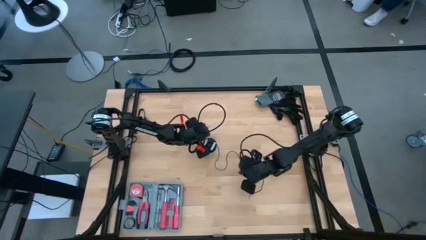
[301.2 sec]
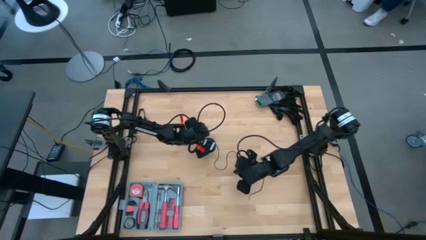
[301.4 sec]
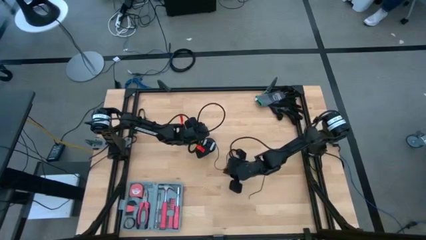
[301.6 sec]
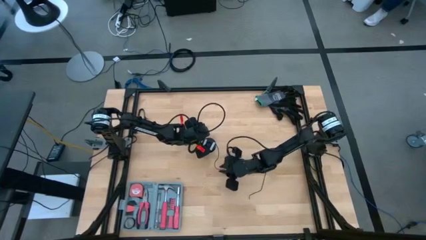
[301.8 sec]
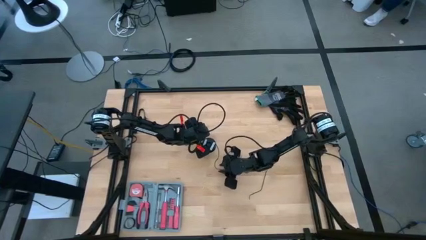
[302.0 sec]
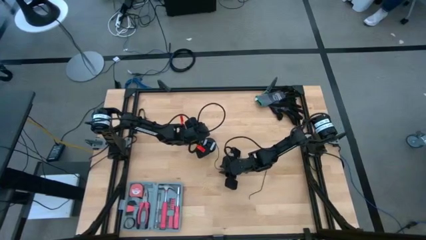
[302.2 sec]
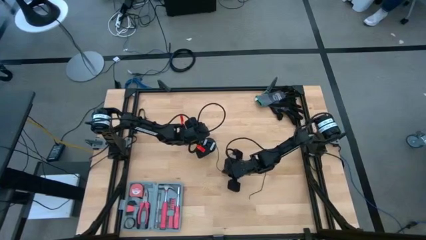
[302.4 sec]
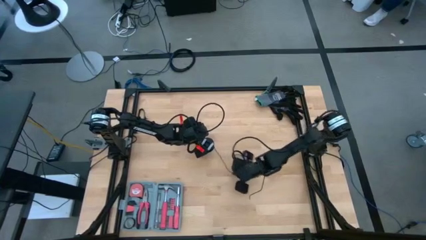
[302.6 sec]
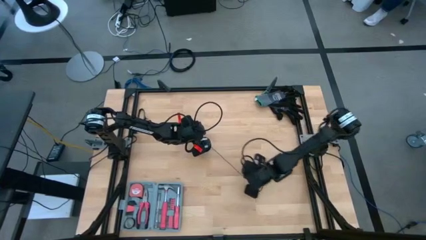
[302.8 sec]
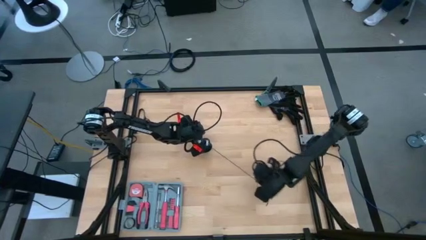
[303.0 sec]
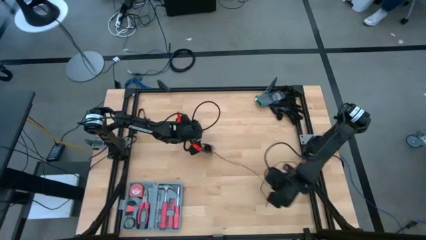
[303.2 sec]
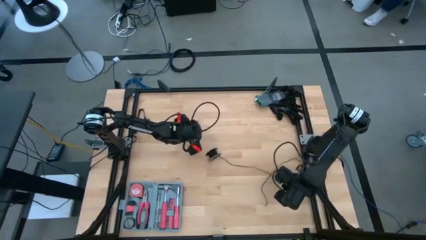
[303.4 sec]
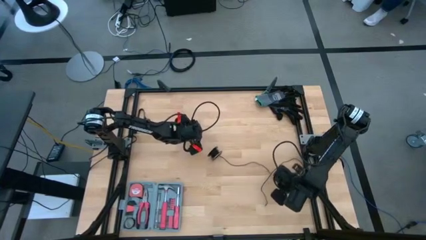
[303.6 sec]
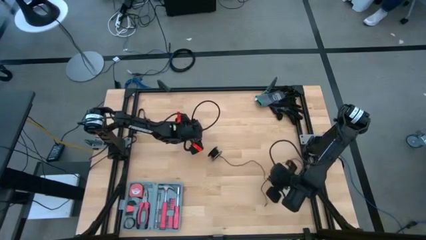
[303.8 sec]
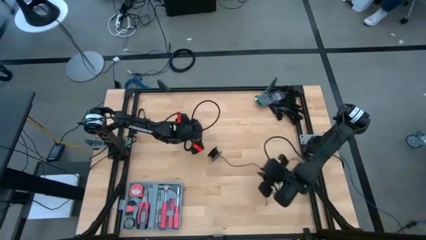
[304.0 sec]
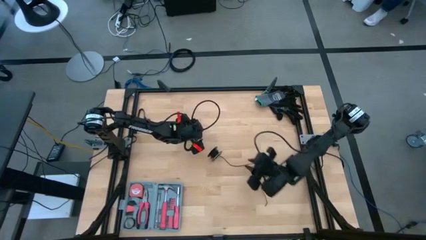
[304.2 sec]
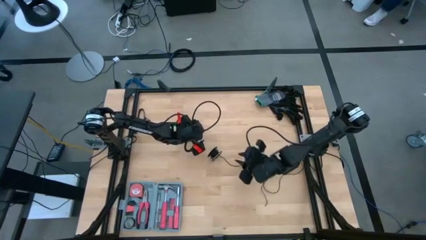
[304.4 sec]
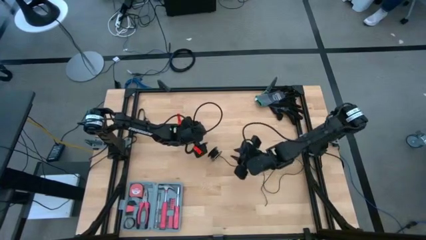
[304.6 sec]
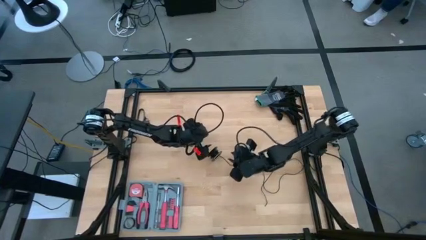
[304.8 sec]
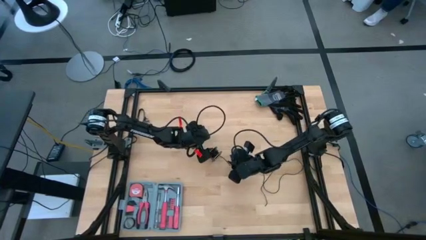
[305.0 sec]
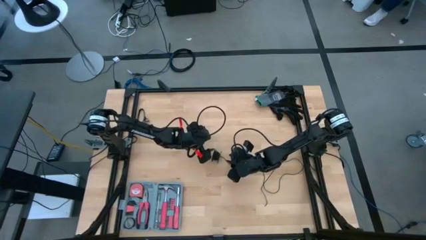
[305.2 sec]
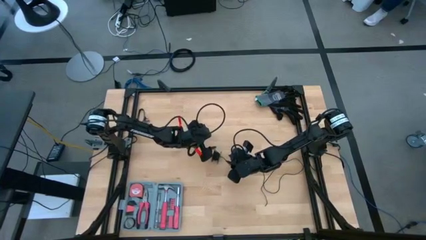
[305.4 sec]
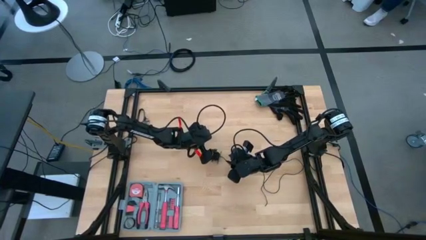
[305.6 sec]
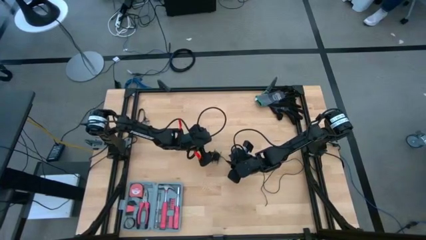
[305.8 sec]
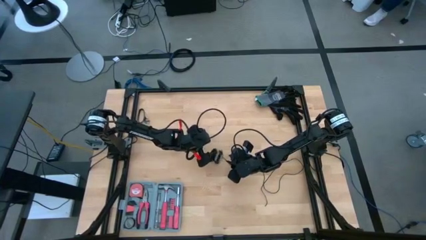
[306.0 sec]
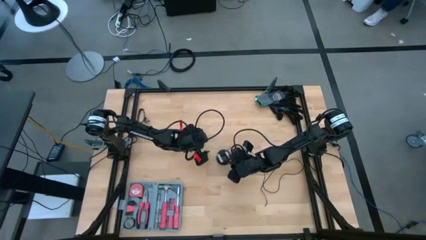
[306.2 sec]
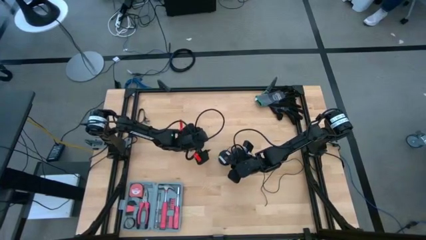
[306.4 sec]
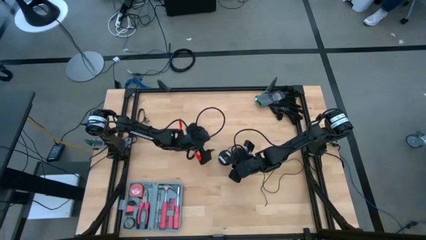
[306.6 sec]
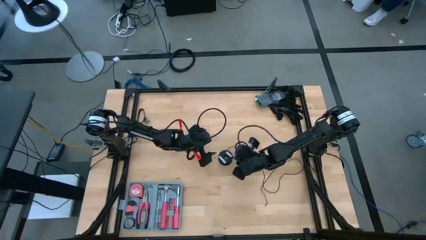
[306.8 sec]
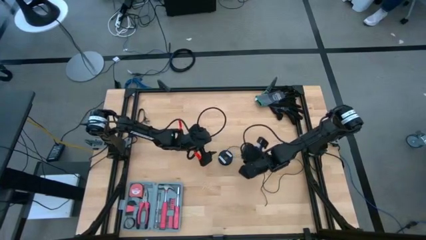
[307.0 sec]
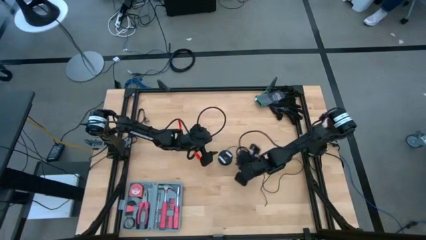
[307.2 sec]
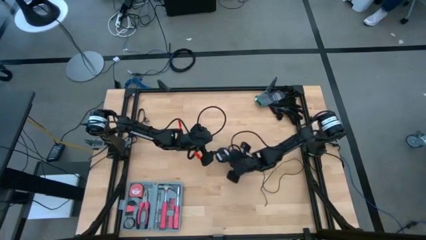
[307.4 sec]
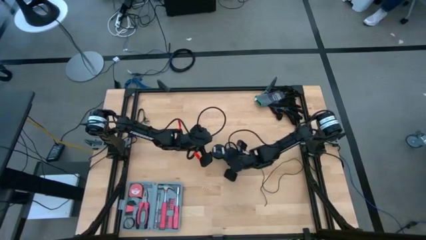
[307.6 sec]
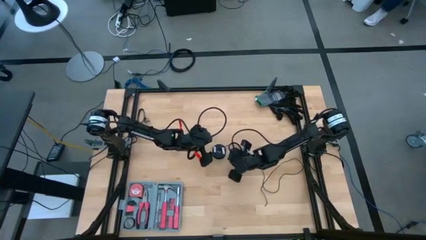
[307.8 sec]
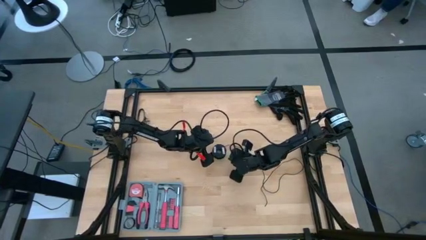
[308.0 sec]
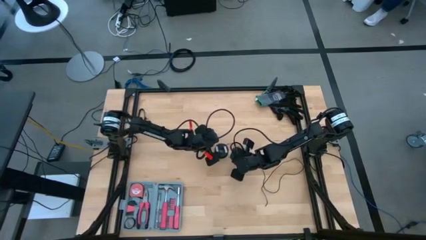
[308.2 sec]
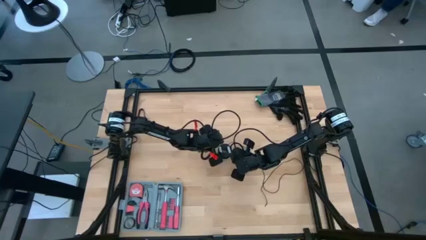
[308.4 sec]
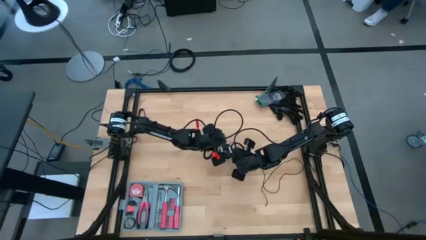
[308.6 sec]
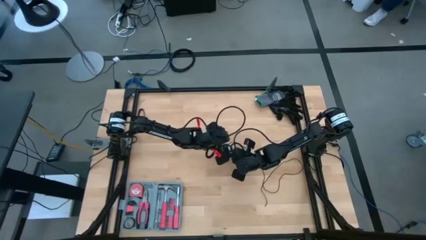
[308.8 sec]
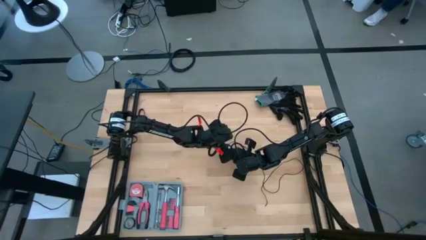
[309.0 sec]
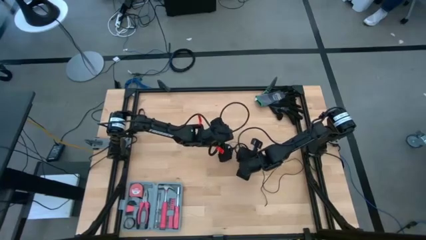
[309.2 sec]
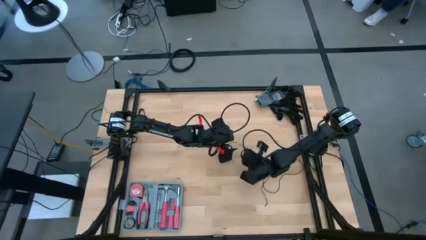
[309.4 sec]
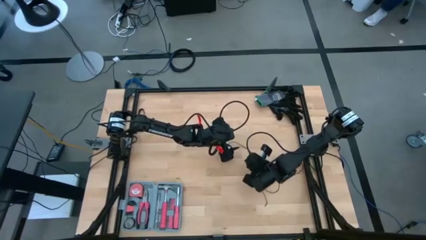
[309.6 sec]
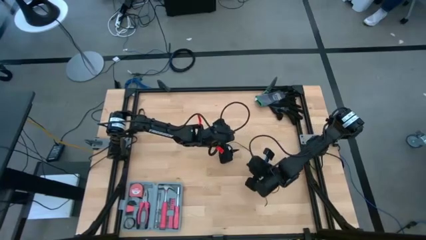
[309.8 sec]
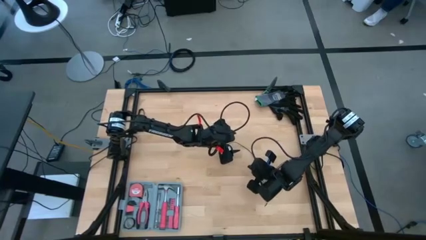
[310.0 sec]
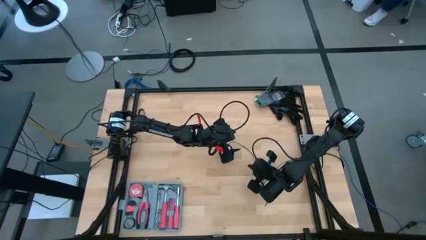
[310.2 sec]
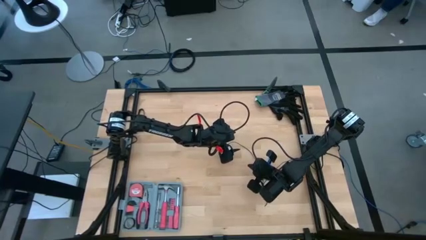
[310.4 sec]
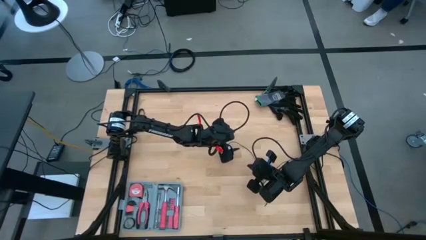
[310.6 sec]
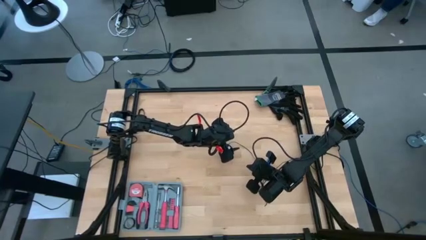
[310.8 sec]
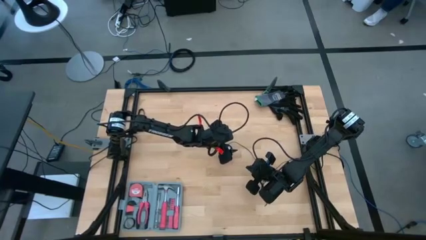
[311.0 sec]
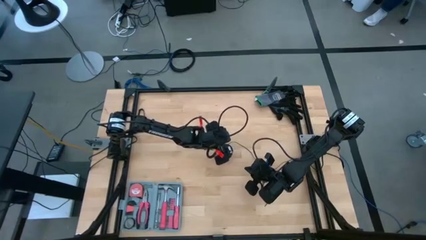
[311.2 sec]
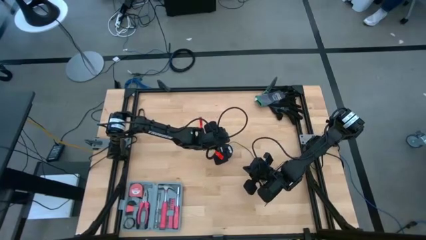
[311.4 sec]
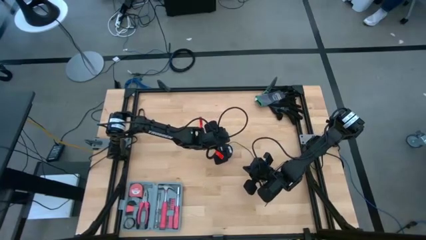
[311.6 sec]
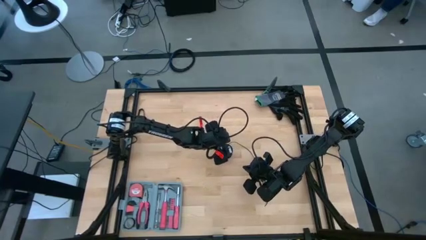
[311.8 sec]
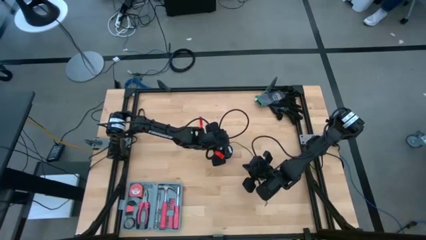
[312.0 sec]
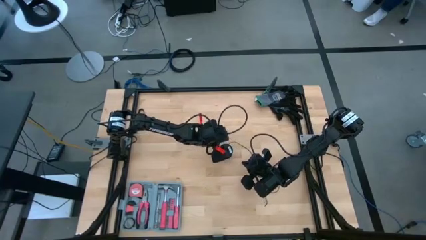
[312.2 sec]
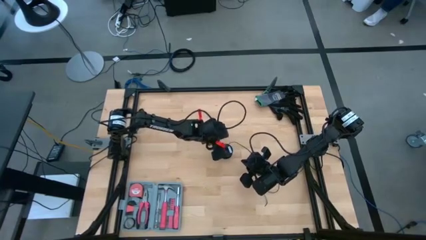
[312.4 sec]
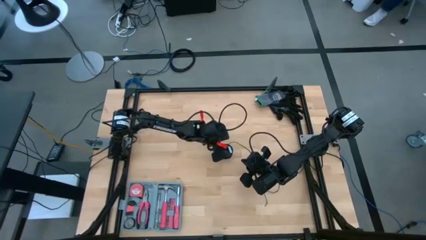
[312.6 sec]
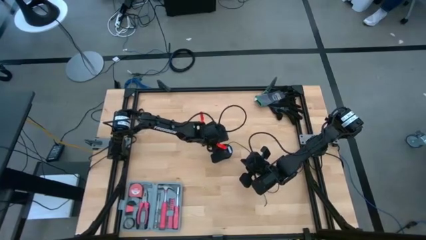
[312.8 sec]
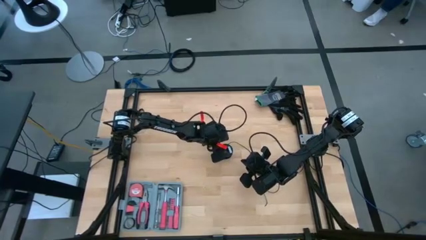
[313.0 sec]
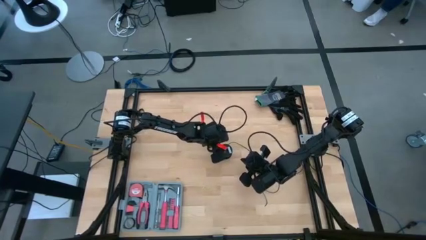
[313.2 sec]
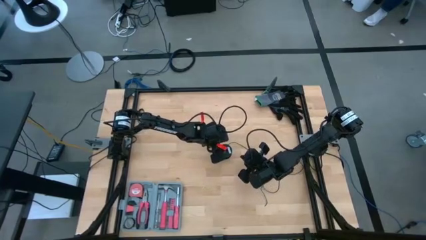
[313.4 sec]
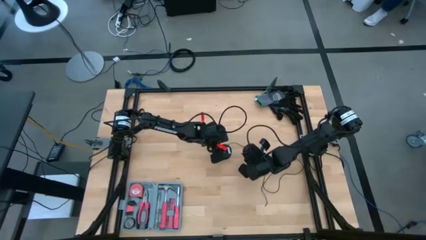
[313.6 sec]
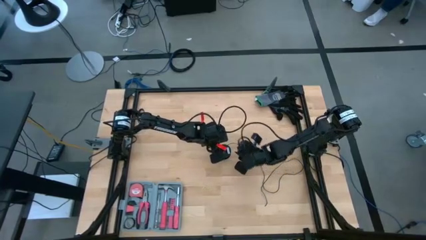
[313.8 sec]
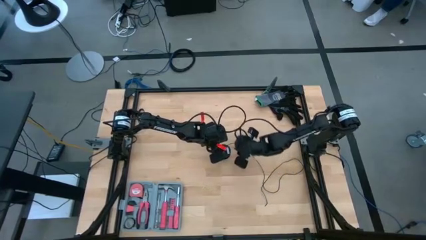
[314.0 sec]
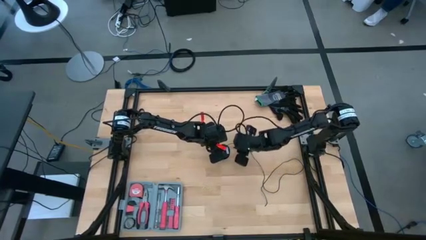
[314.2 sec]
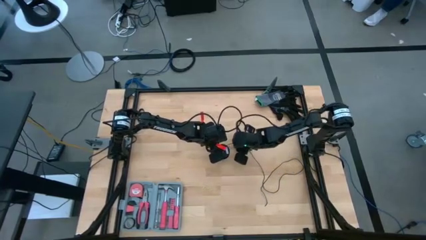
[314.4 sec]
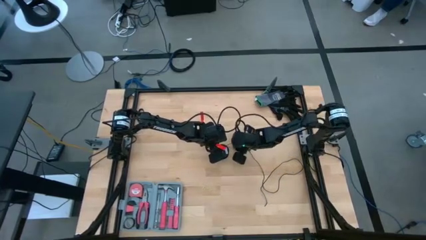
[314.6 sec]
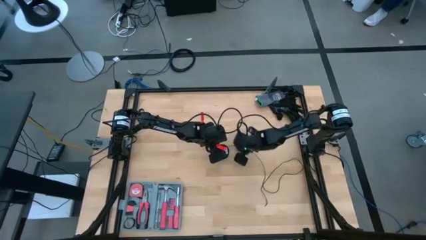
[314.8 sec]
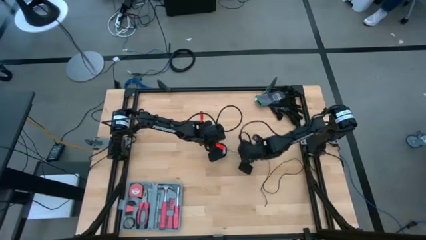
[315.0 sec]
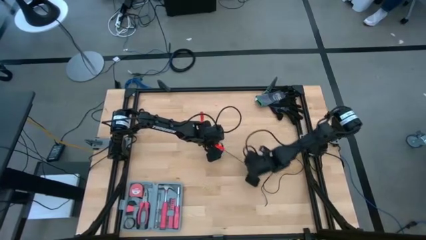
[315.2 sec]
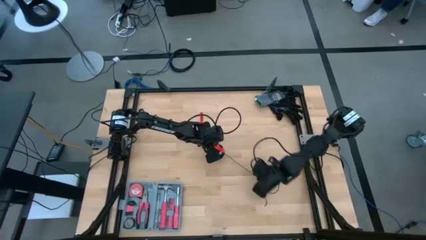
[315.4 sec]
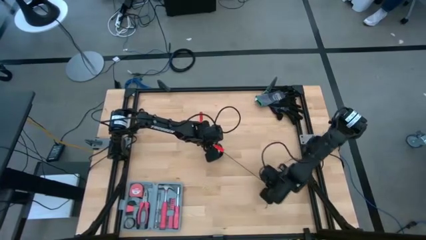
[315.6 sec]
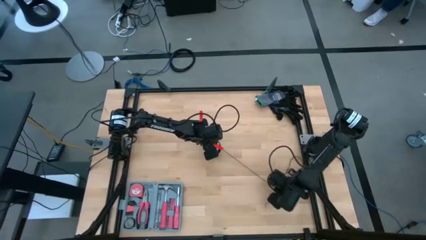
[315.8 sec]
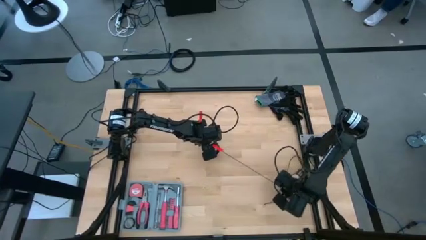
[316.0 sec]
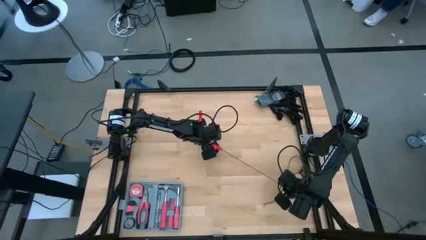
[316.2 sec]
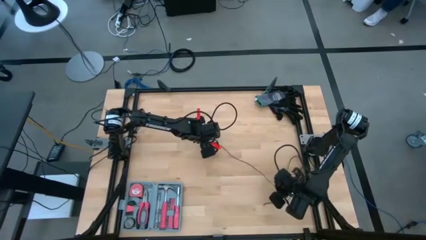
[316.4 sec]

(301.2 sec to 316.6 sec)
Task: Coil cords
Uncoil the black wire from the spool

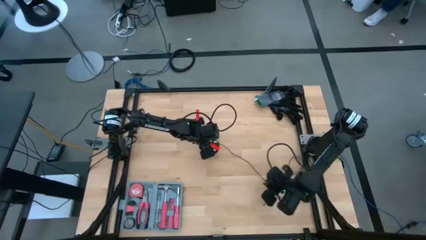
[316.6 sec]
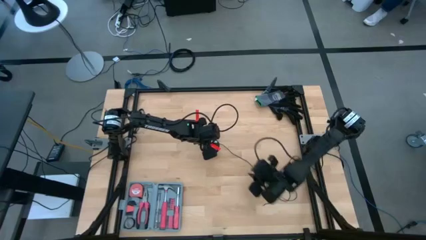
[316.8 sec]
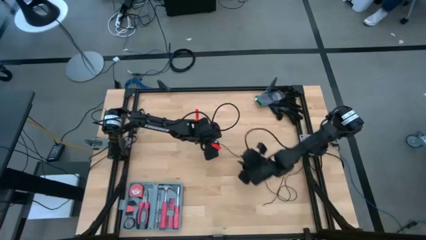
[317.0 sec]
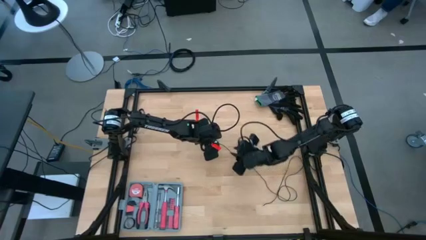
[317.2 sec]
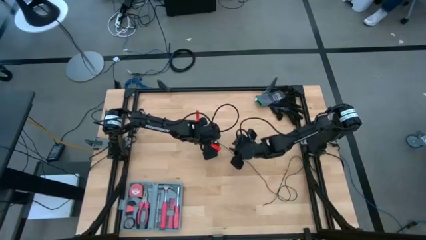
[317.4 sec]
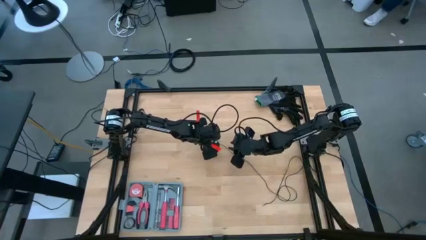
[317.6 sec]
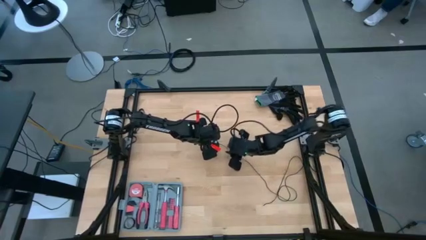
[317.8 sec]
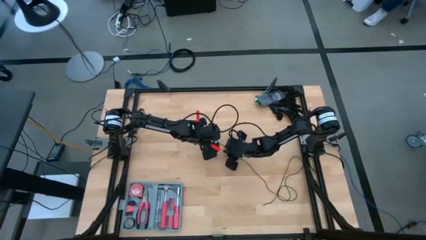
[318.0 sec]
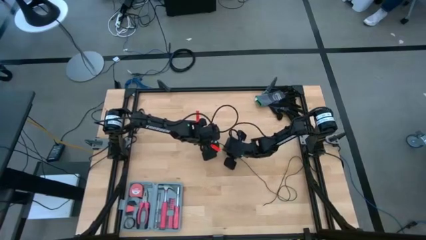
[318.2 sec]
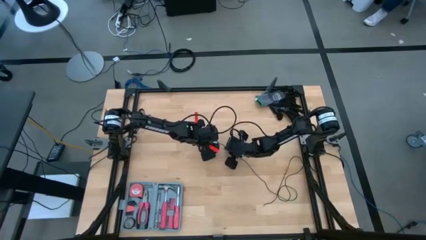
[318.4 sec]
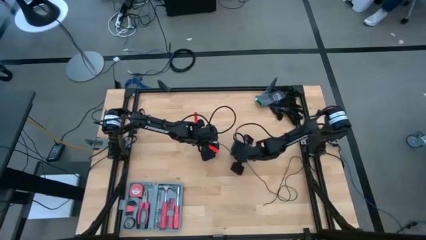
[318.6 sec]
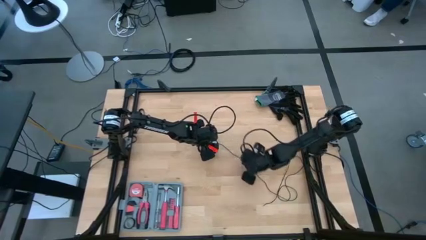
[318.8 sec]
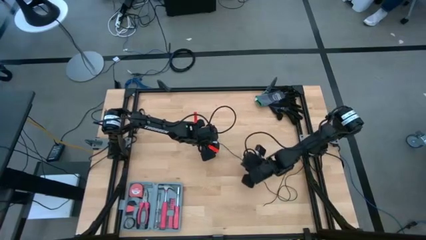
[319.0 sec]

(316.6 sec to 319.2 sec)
Uncoil the black wire from the spool
